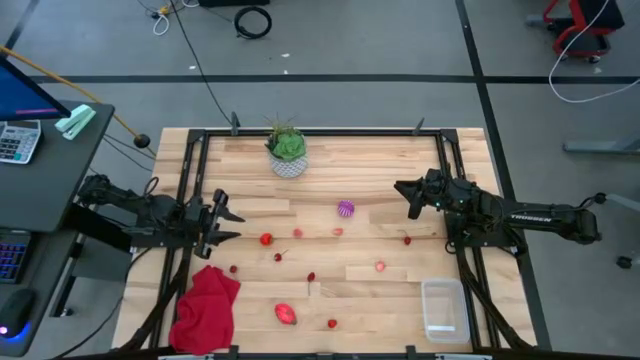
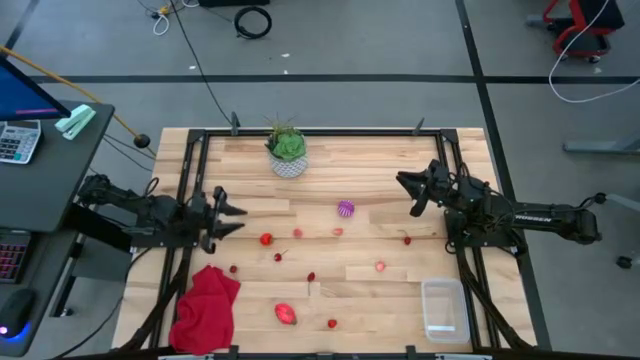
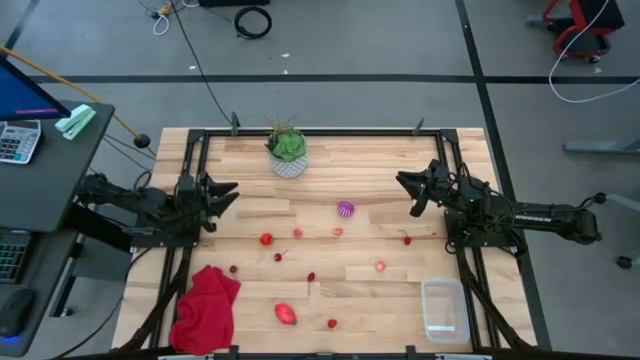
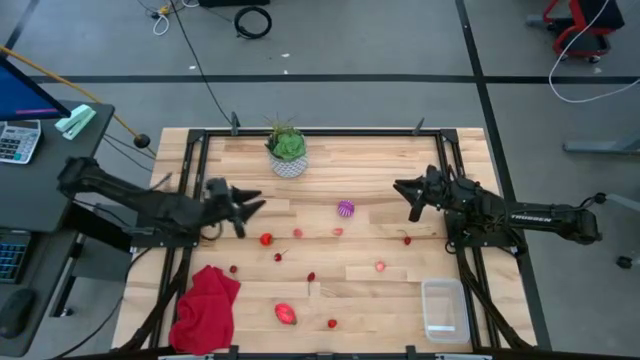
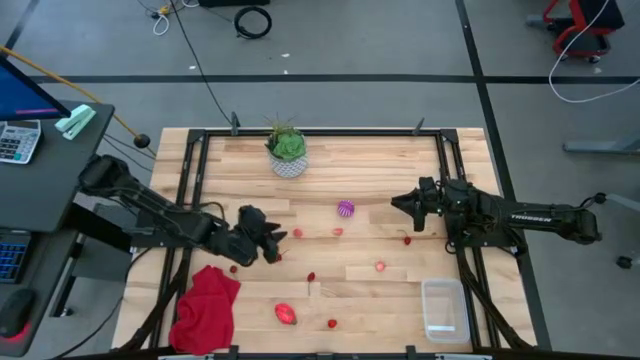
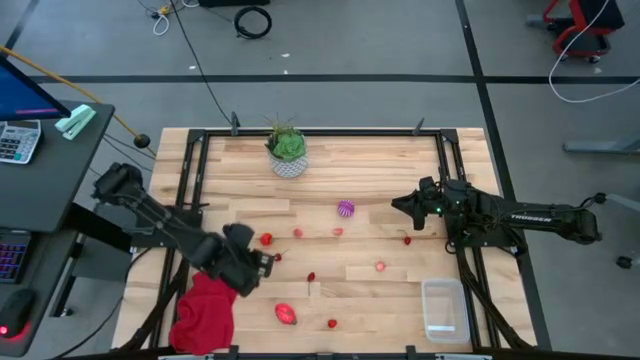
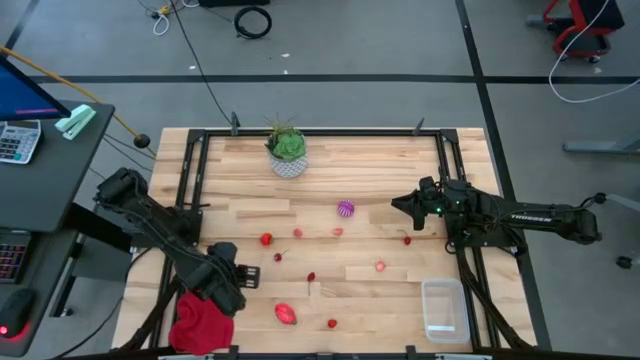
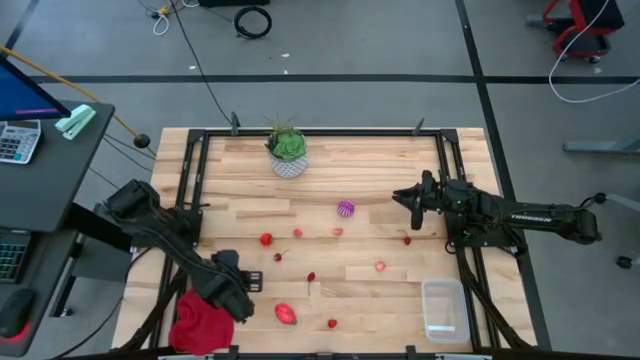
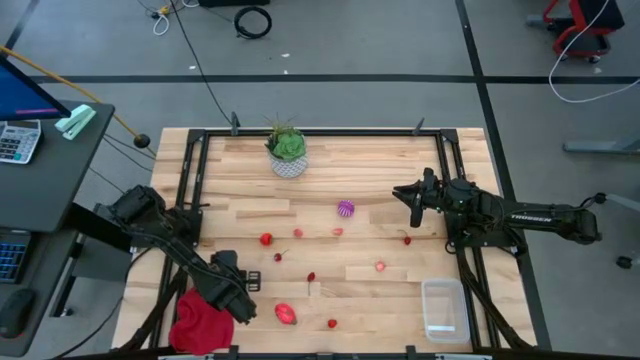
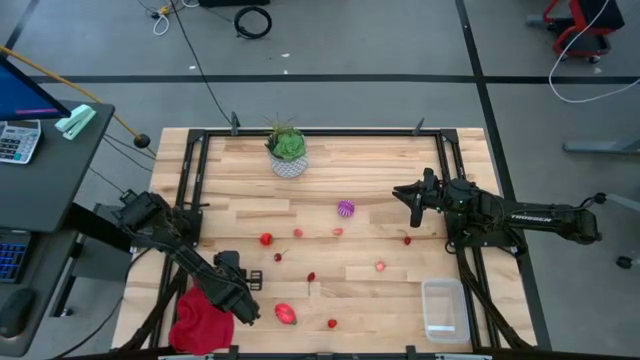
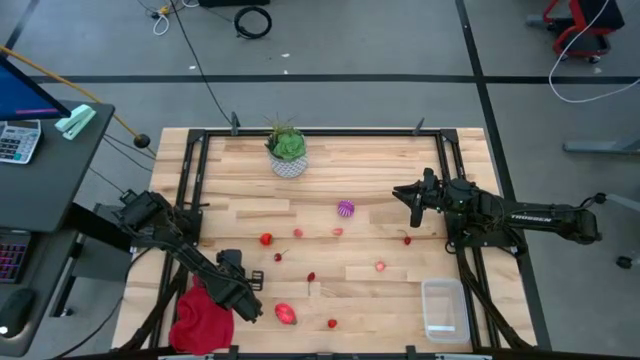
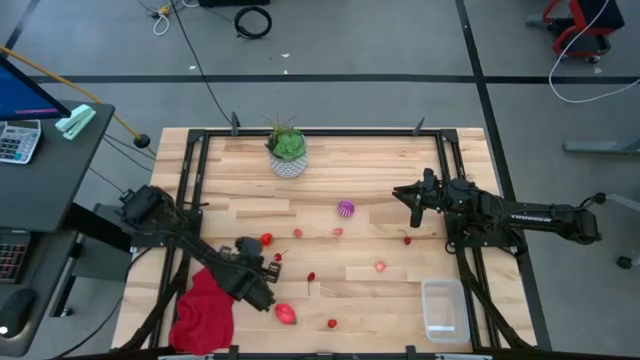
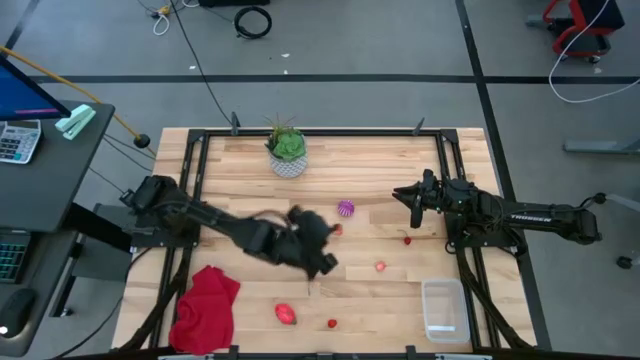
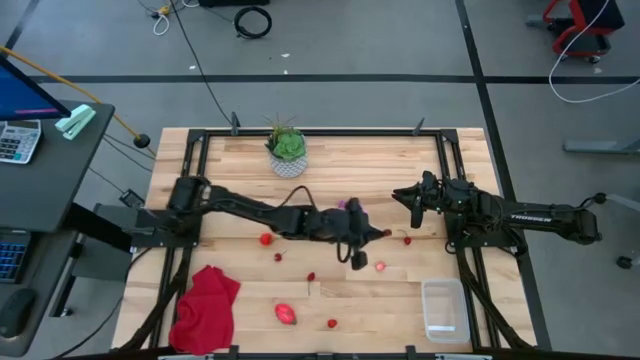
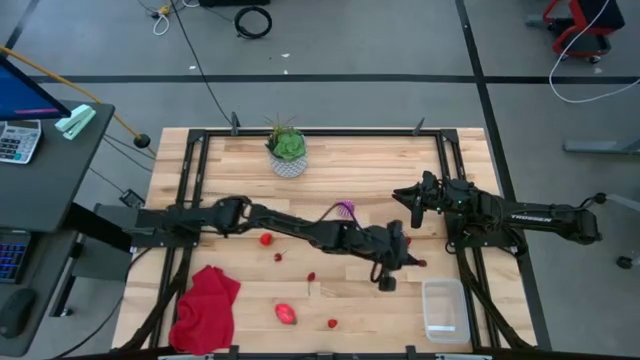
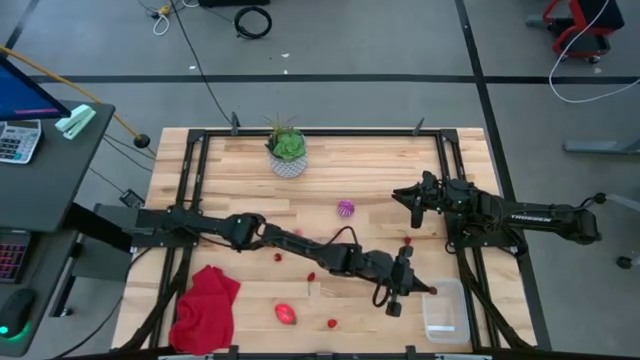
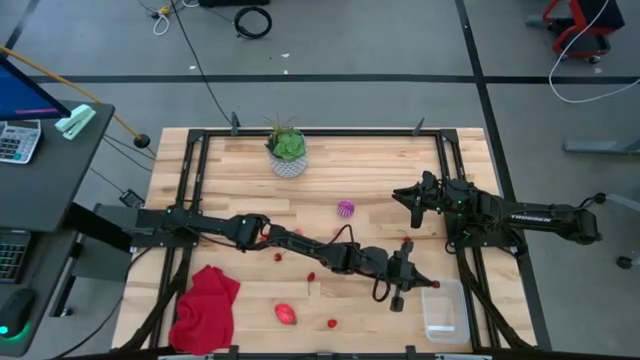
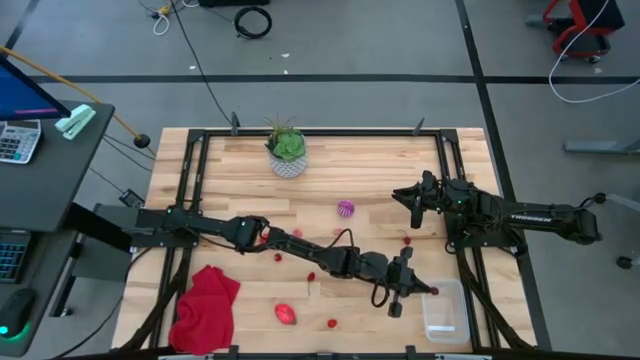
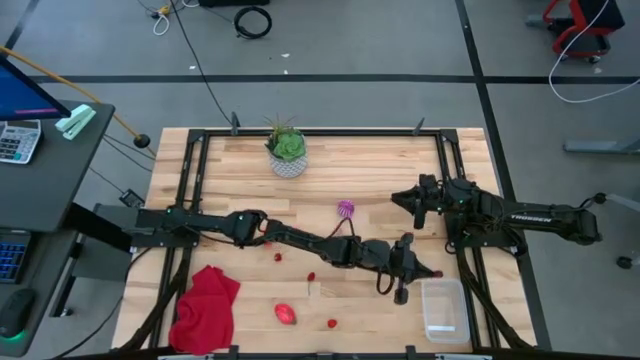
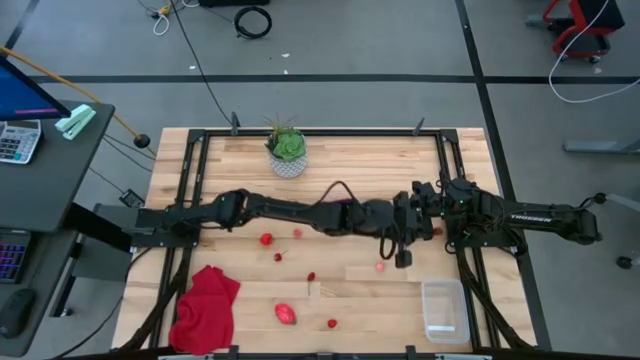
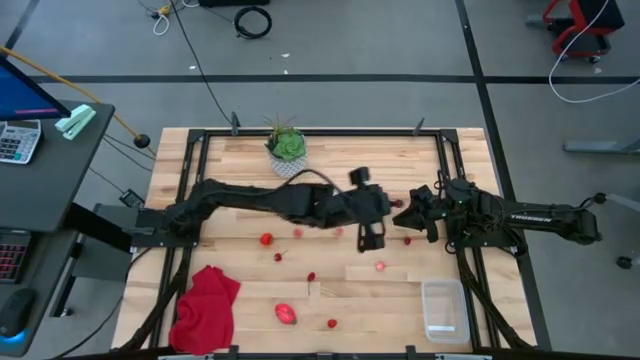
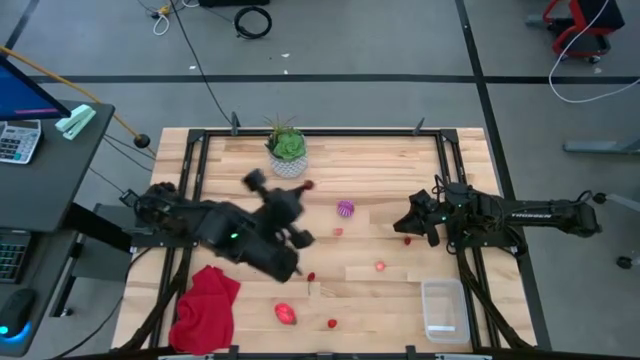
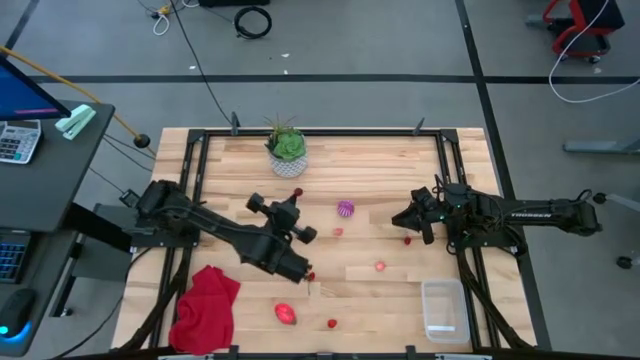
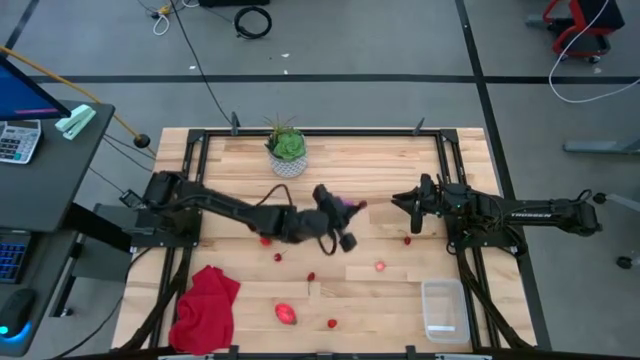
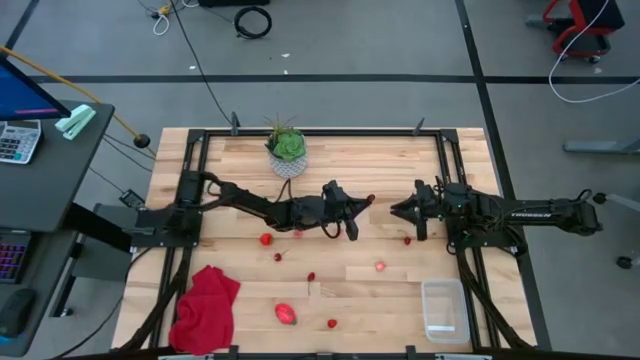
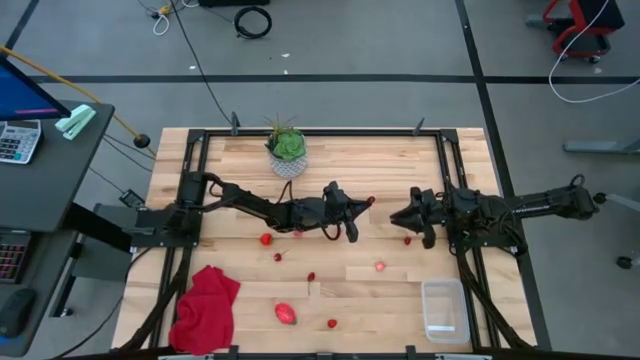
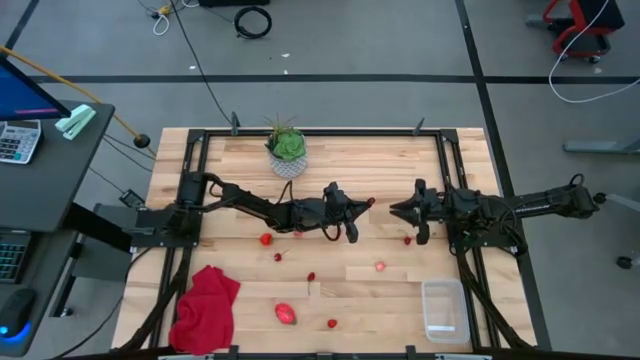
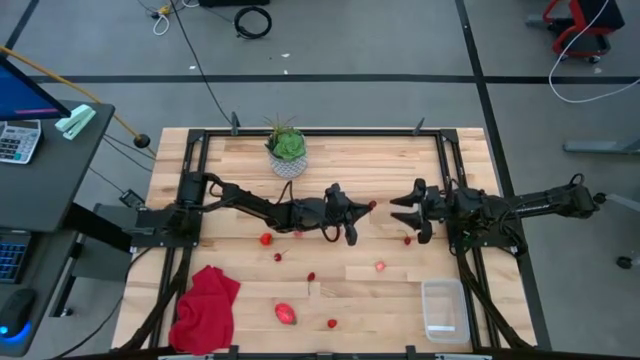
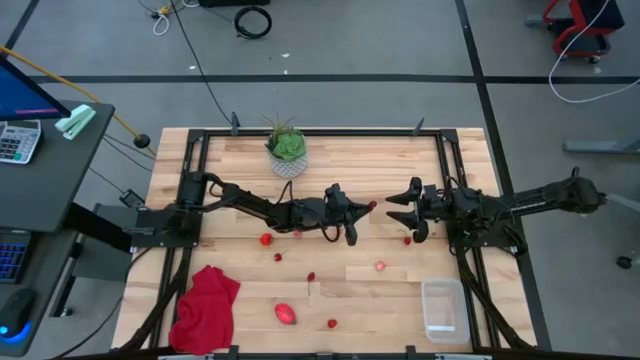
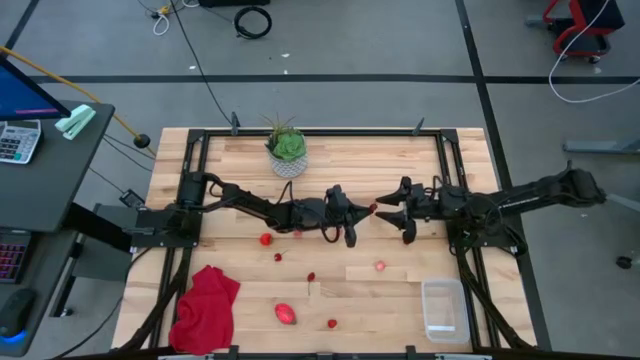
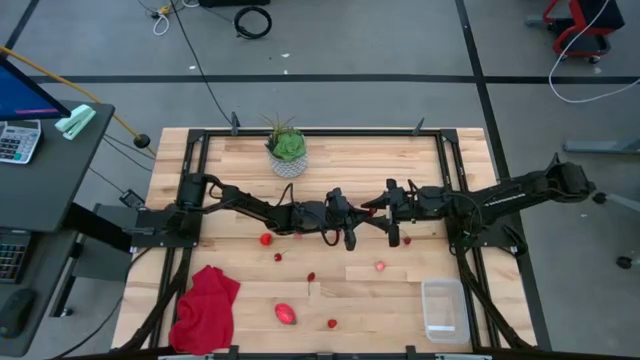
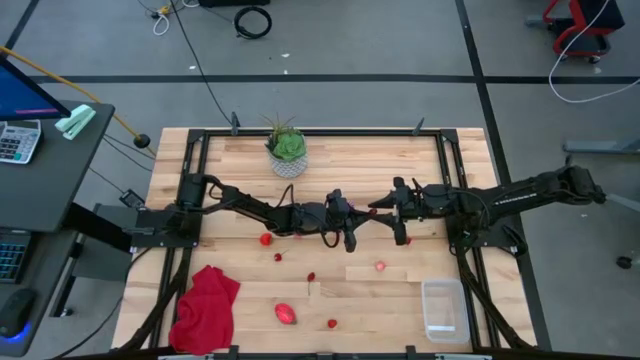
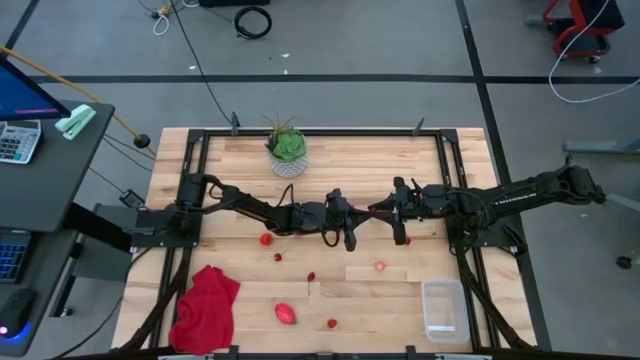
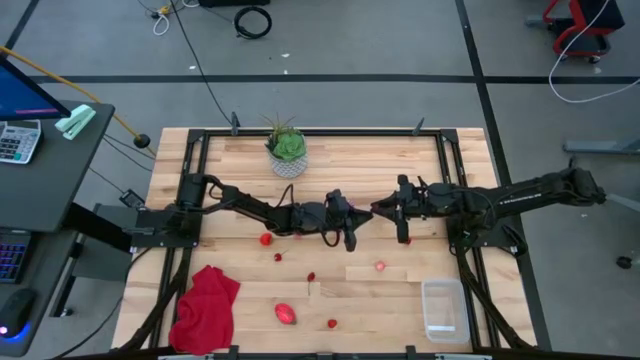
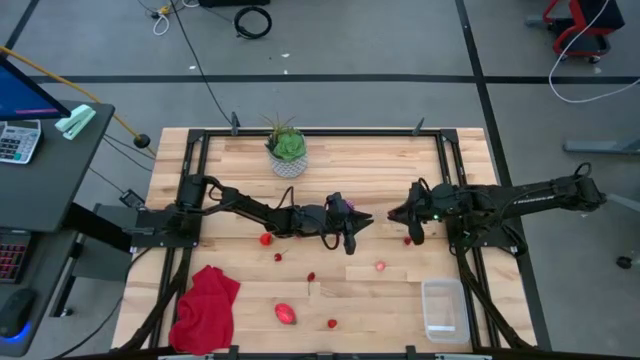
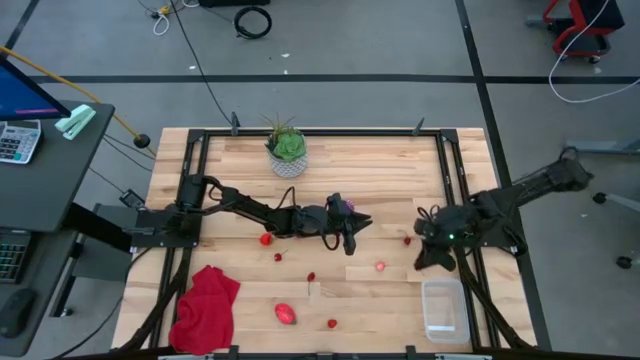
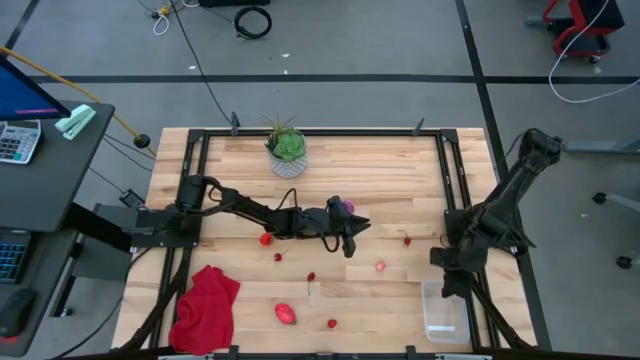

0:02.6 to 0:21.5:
Task: Pick and placing Produce into tupperware
Put the red cherry into the transparent container

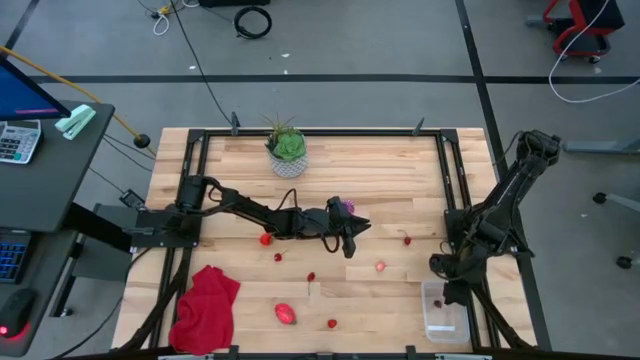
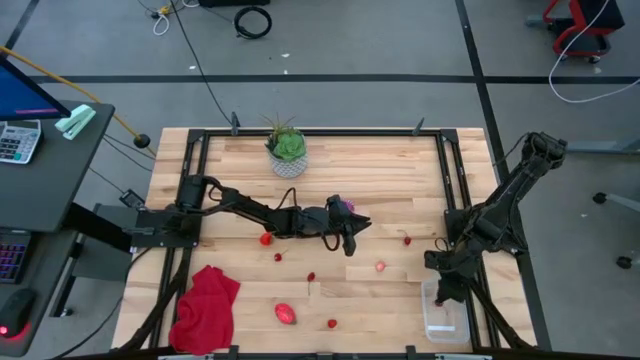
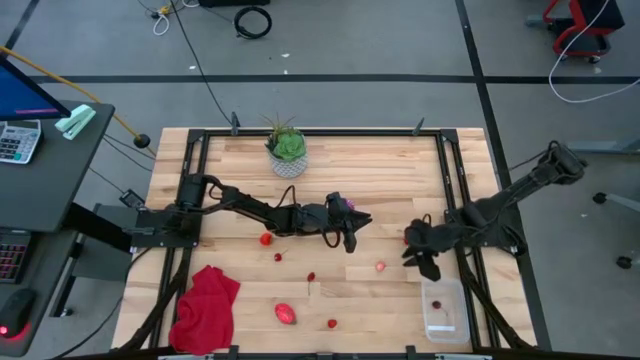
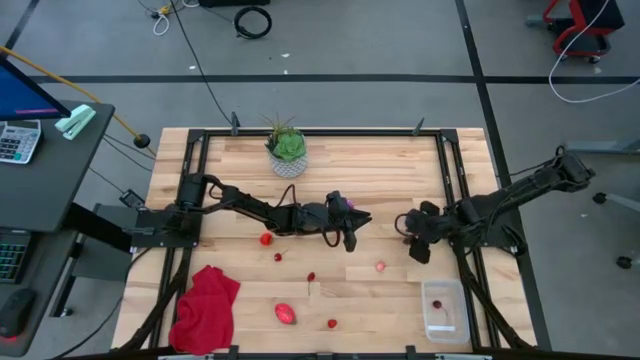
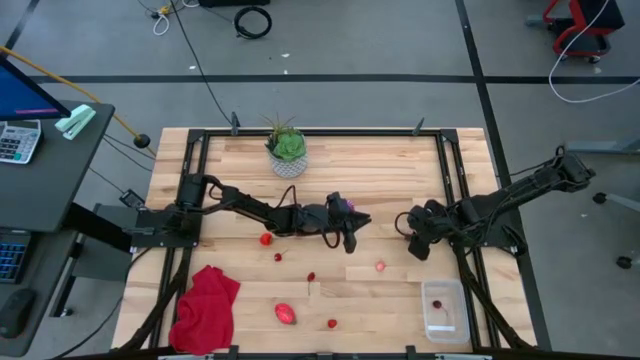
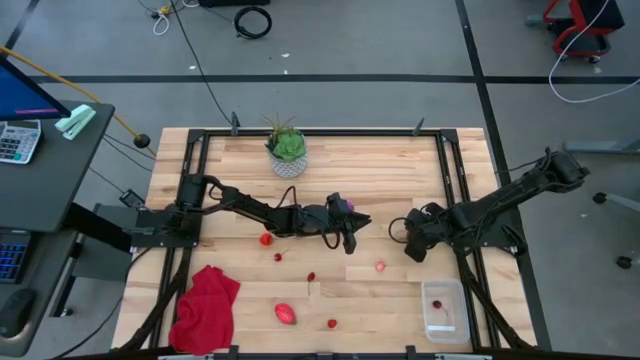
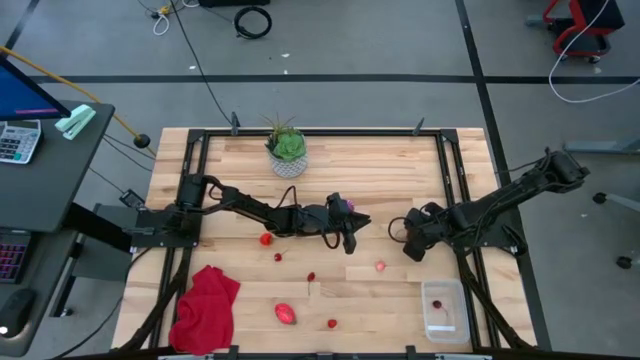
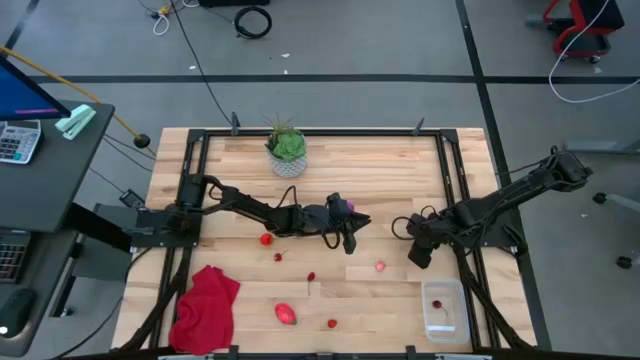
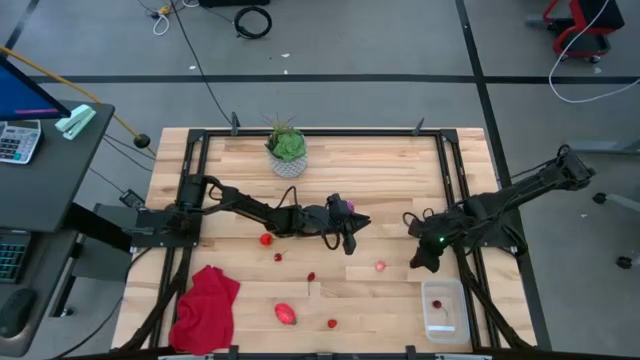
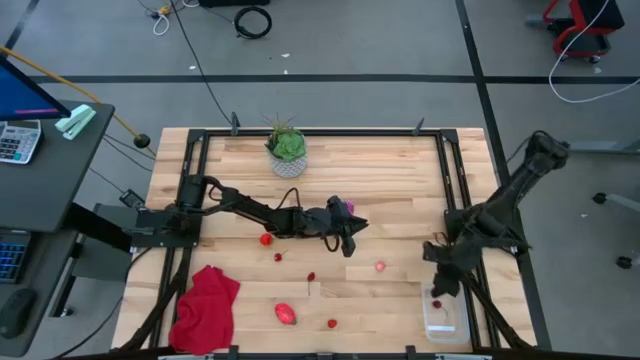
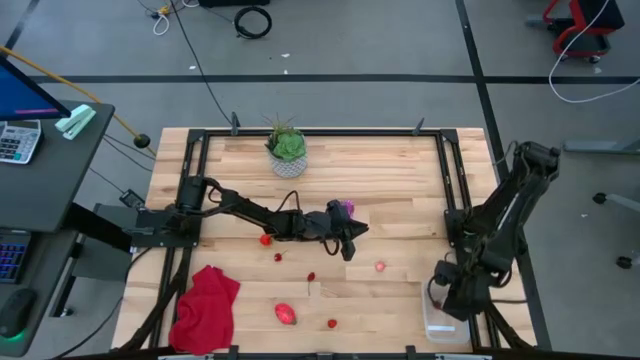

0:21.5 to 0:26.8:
Put the red cherry into the transparent container
